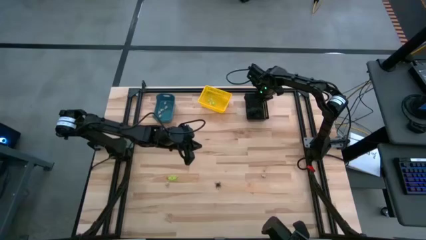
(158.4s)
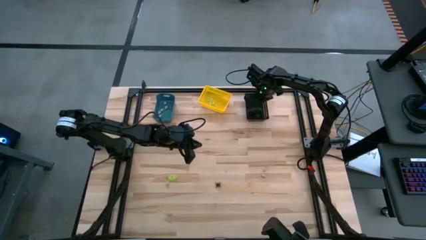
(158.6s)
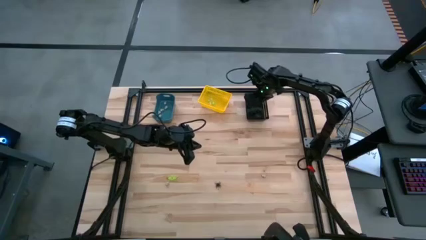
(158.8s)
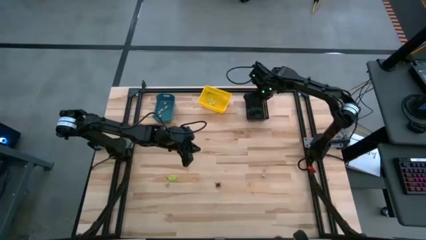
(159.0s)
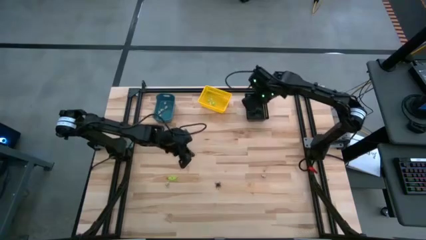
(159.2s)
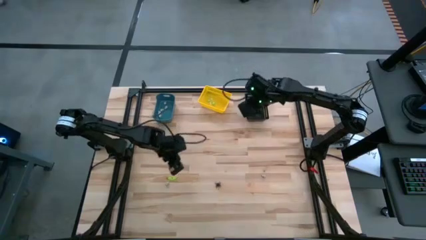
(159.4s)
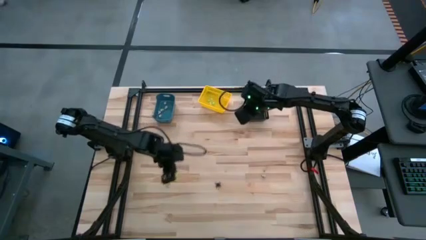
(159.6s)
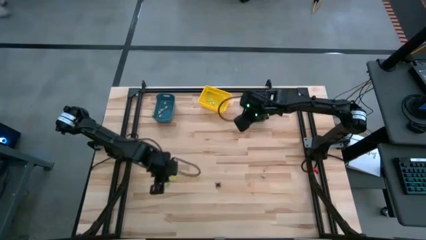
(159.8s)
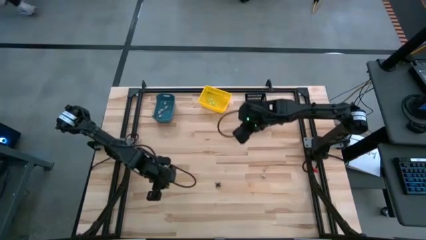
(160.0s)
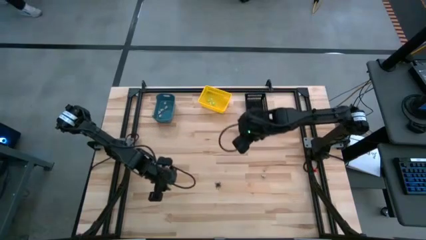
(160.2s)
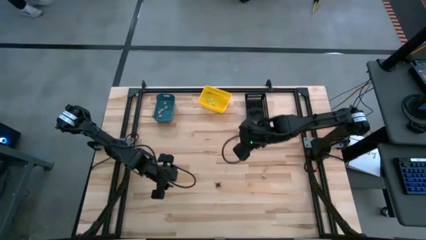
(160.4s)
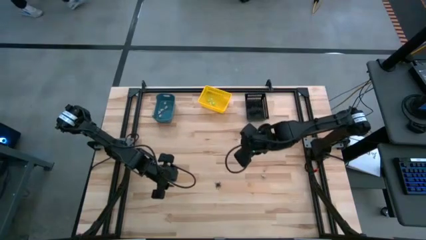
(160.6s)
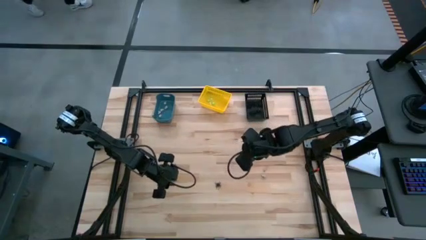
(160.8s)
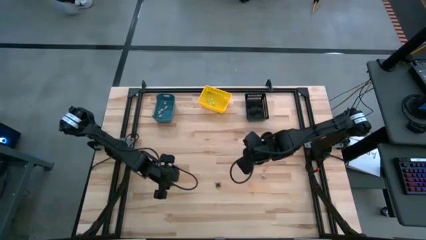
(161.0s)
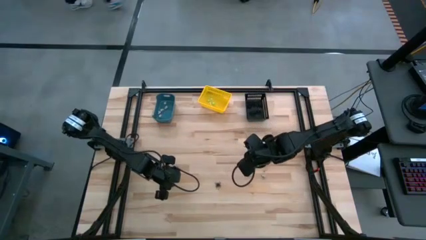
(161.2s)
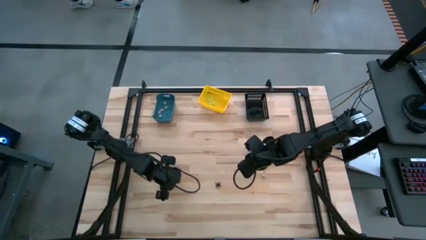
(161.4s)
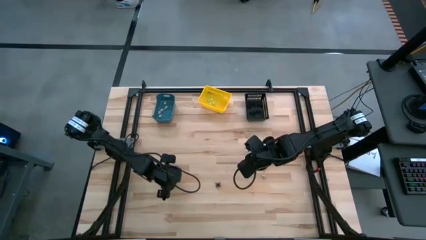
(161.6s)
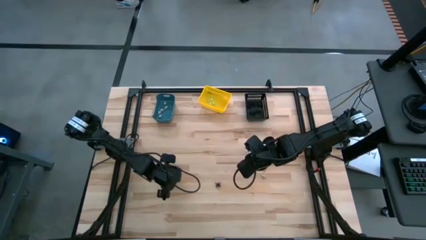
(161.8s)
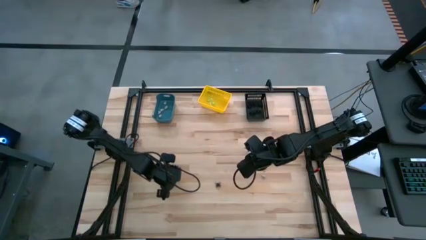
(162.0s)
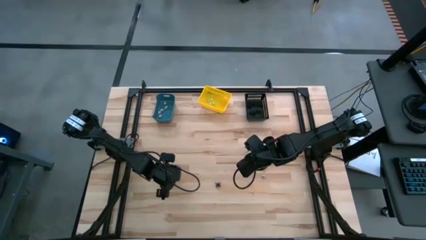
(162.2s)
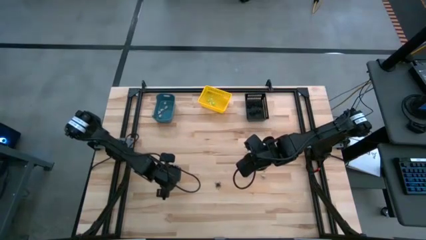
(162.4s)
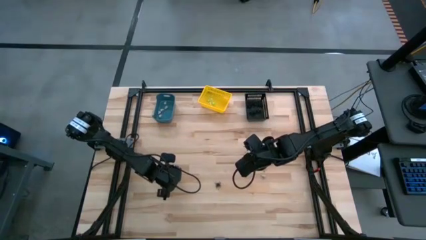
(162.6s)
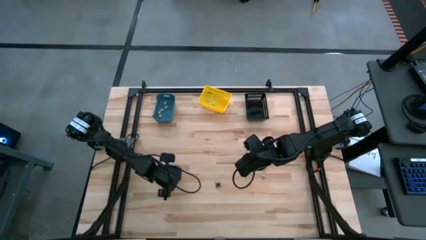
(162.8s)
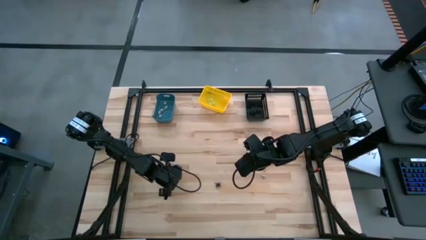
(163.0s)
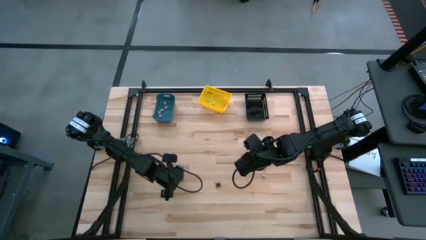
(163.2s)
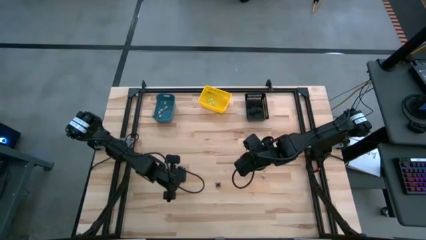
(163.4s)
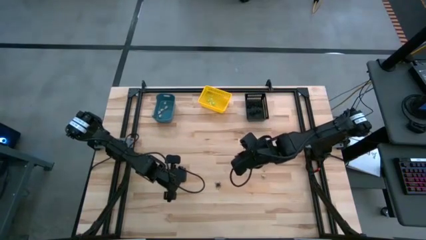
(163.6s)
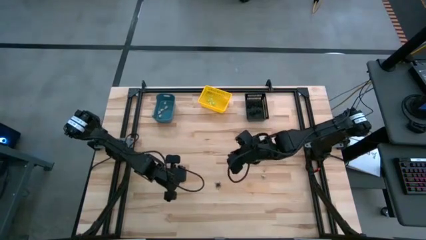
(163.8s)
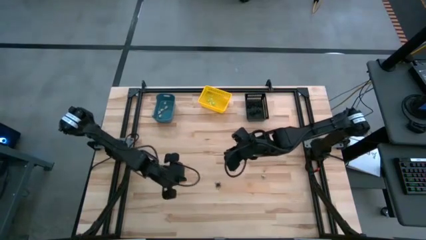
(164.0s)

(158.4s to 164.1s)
Task: Sort Halloween decoration
Put the green spider toy into the yellow bin

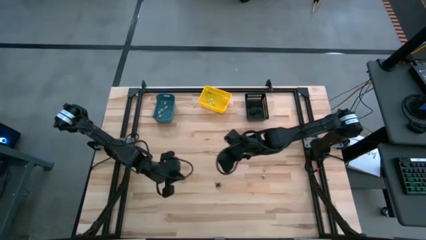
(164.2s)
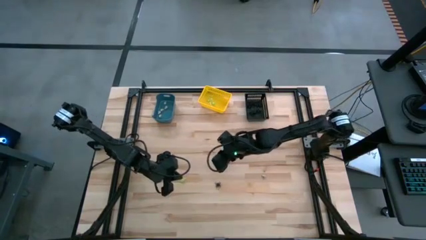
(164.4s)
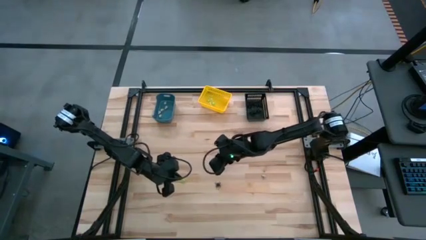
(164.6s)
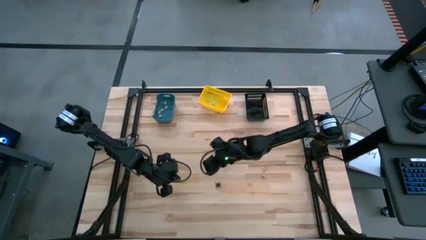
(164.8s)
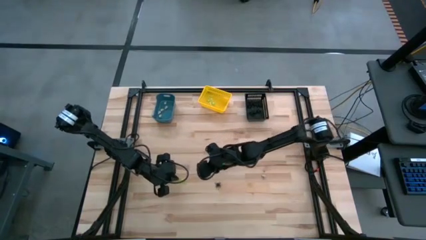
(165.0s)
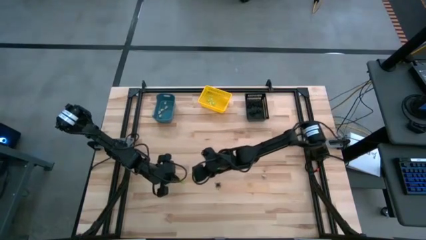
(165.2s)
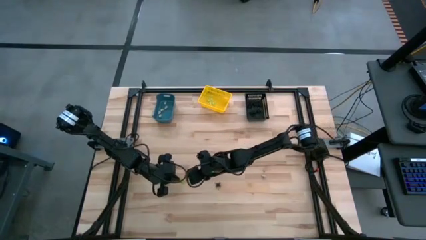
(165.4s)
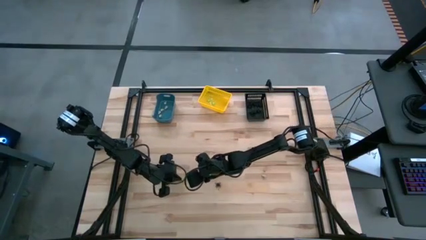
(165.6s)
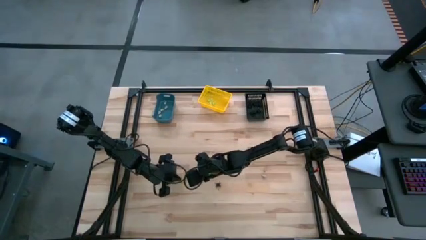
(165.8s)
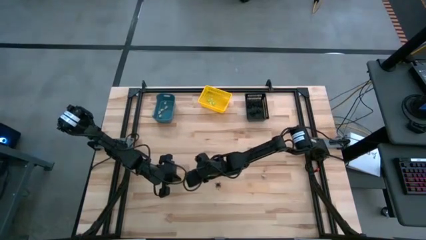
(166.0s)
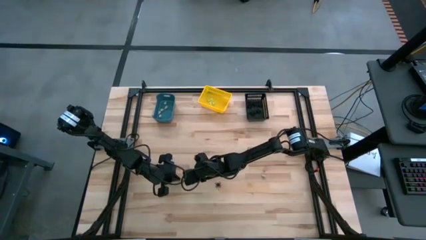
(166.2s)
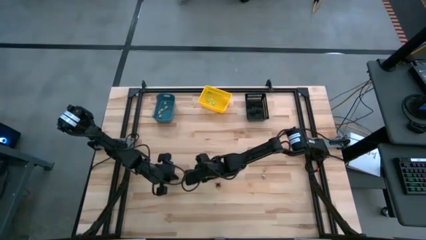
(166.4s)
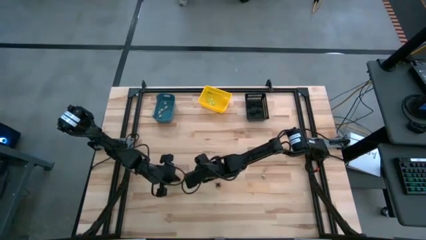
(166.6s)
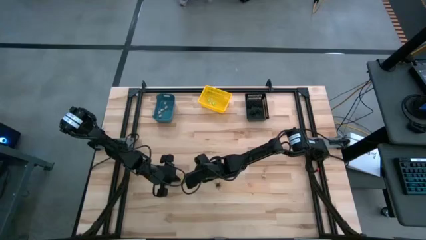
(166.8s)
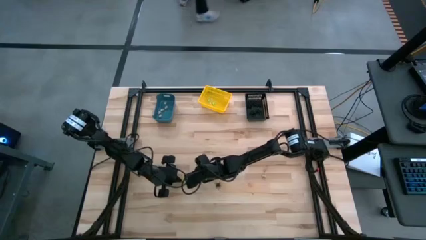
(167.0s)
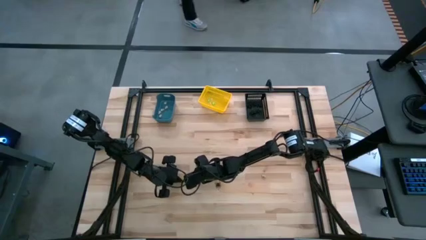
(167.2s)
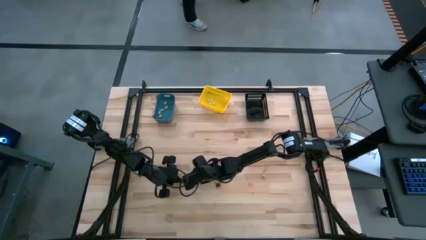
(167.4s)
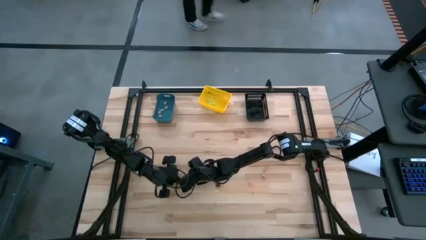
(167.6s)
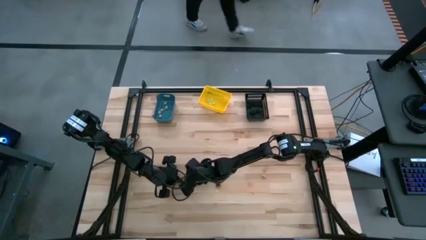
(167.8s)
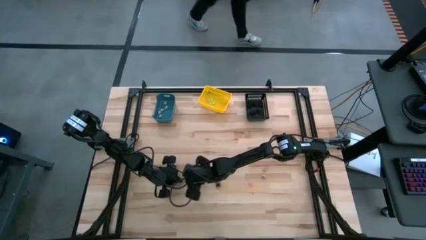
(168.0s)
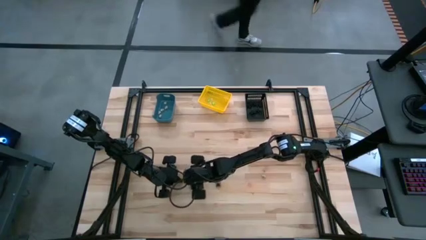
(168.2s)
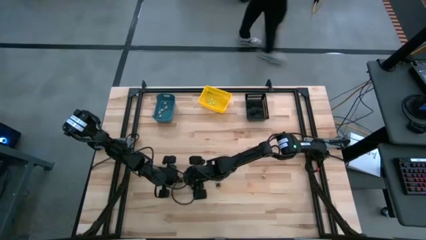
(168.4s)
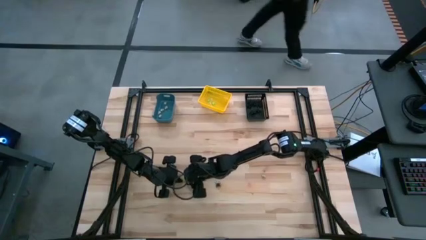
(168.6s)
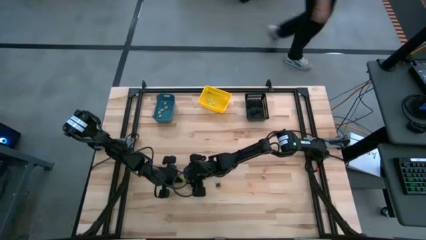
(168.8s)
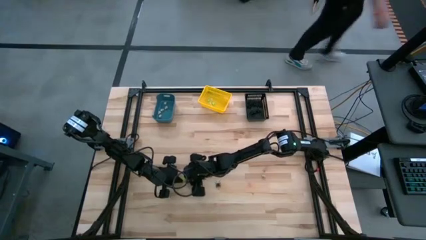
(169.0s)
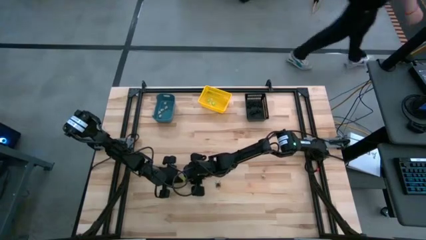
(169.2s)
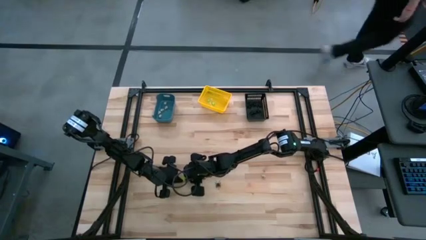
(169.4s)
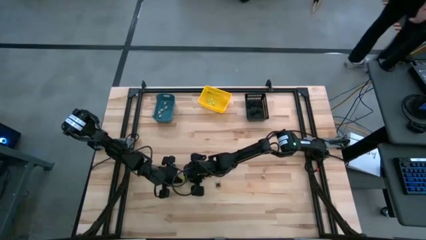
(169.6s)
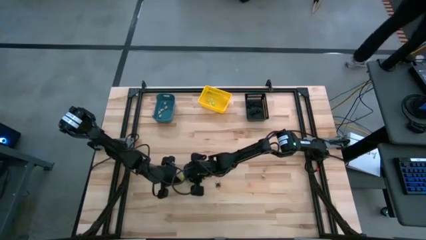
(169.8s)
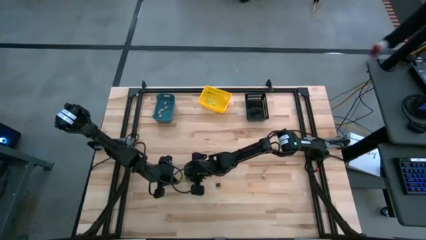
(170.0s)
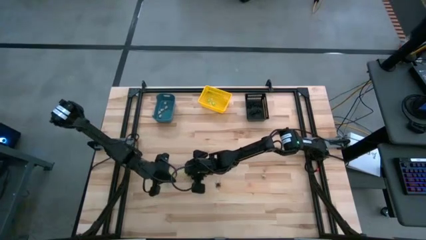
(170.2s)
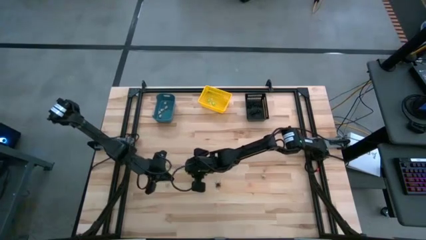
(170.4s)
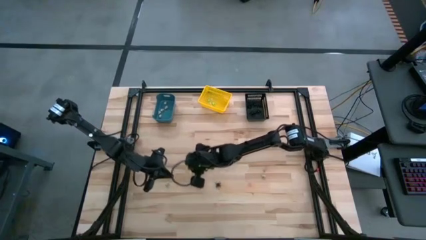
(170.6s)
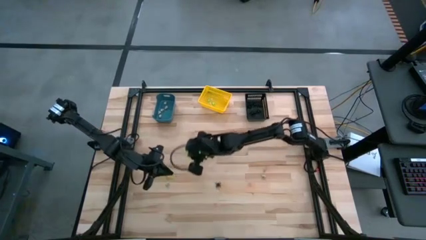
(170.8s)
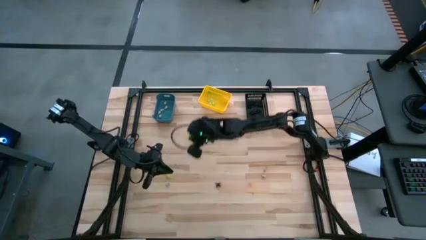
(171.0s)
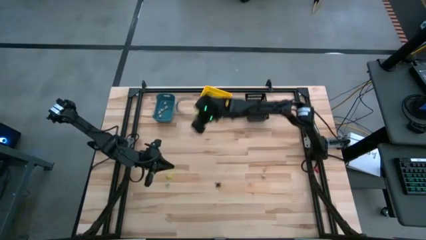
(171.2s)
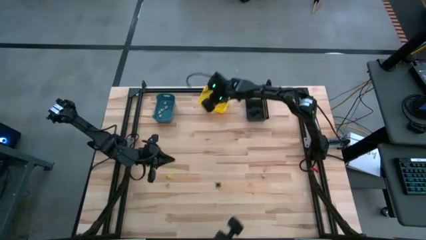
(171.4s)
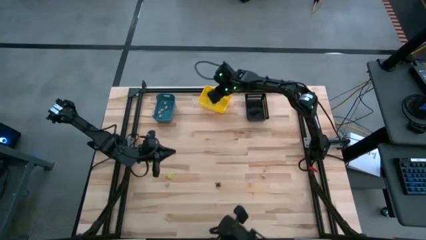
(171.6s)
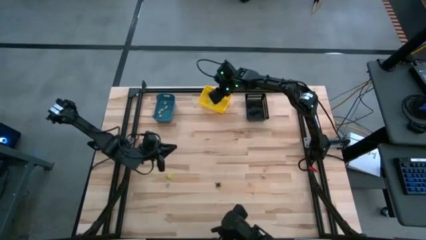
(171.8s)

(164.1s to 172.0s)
Put the green spider toy into the yellow bin

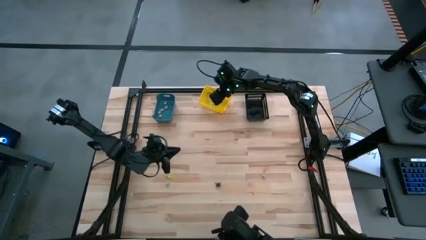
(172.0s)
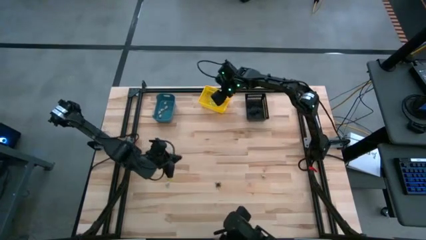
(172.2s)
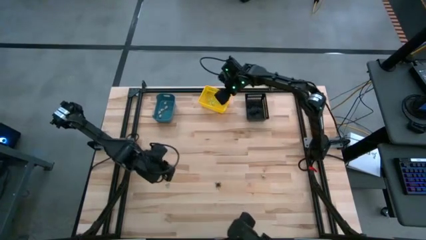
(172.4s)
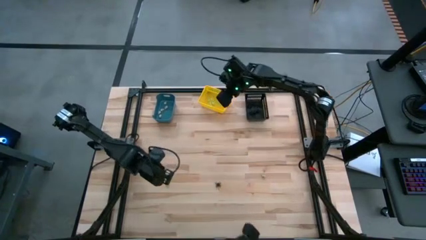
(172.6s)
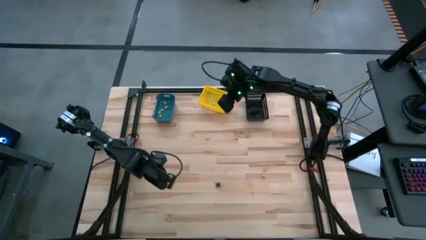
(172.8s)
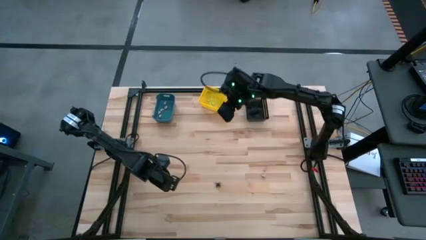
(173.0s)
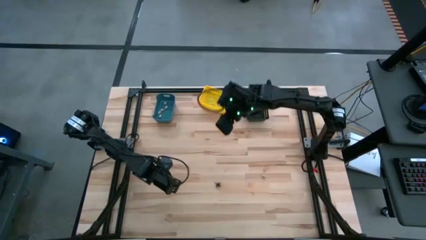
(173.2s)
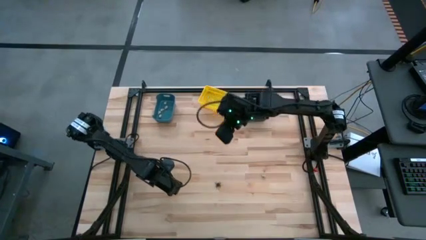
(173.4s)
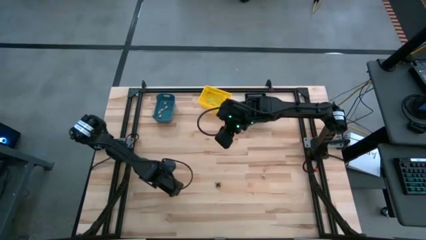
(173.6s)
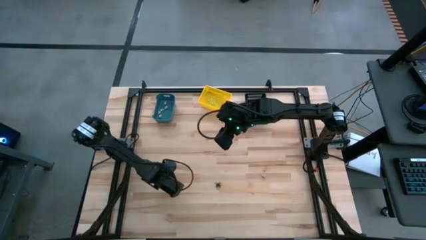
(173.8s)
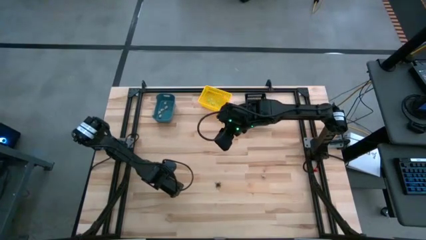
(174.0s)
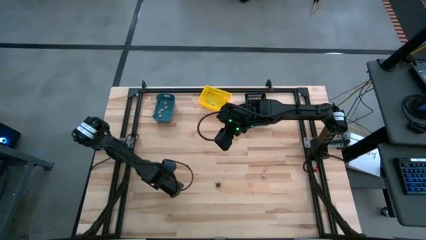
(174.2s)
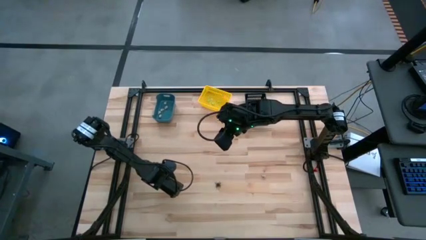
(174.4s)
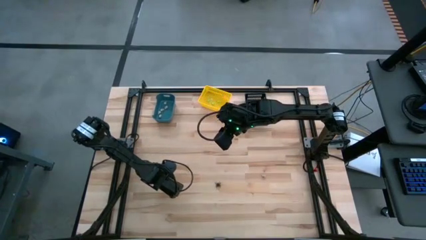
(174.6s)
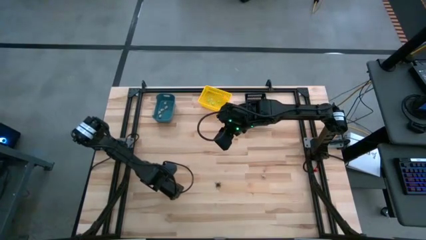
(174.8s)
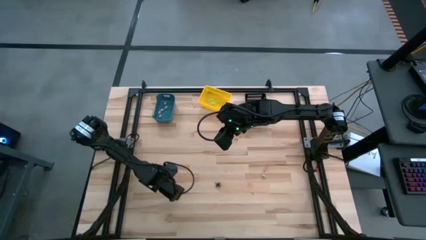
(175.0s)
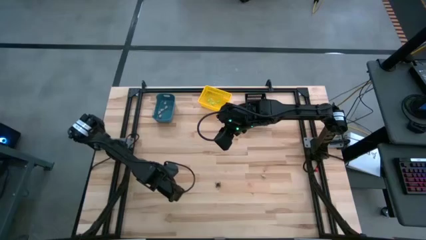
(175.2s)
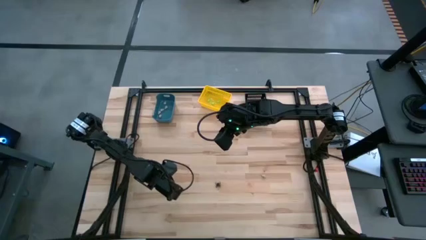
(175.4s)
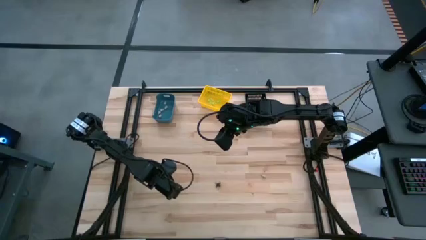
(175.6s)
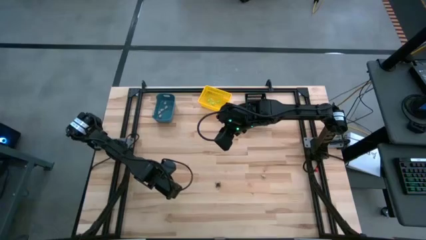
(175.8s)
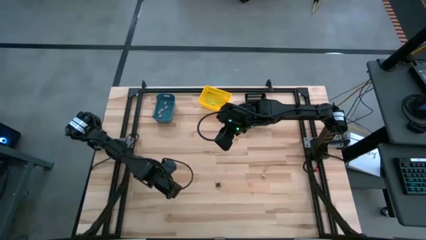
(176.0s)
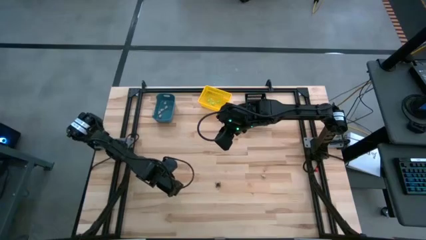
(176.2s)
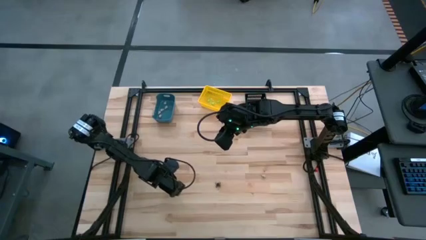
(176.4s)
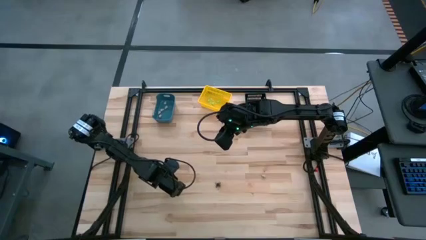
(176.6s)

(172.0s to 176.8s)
Put the gray skull toy into the blue bin
